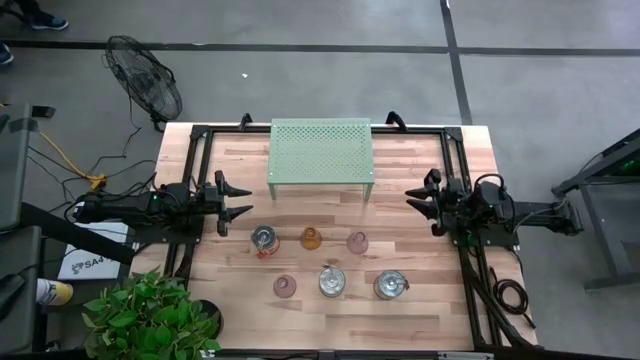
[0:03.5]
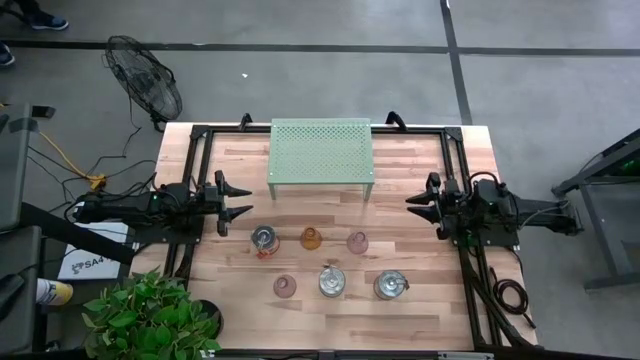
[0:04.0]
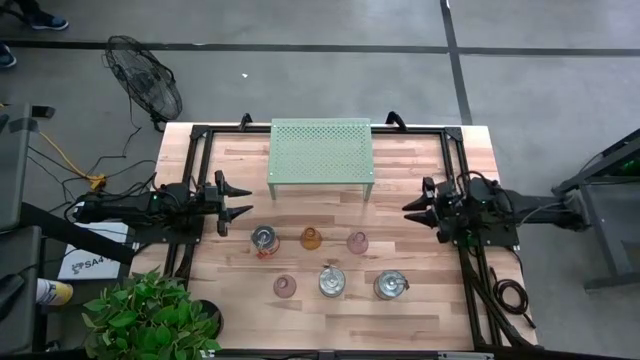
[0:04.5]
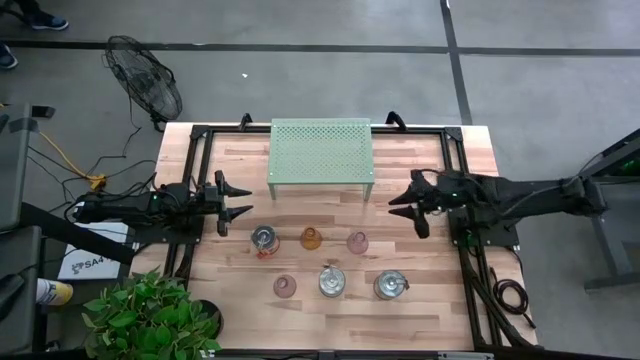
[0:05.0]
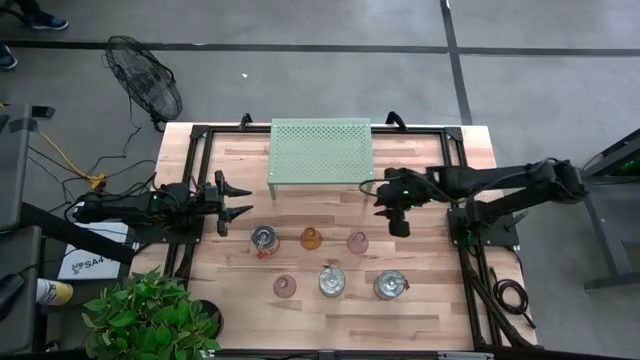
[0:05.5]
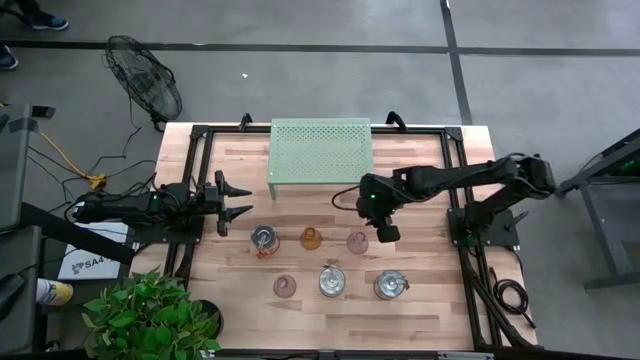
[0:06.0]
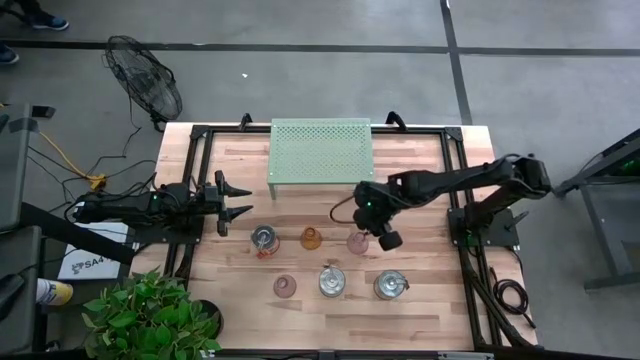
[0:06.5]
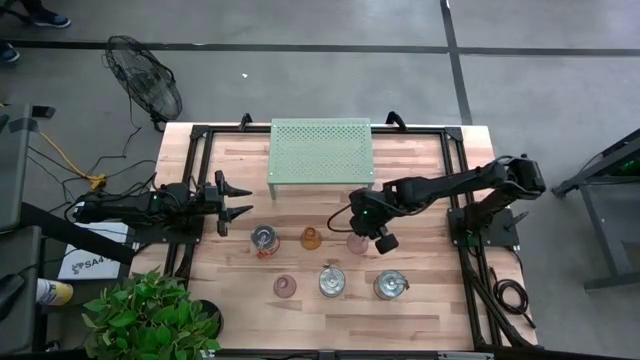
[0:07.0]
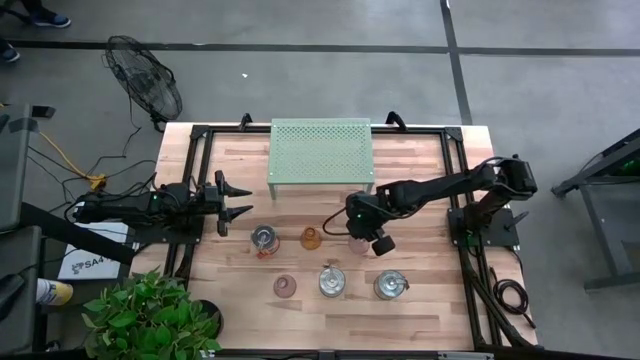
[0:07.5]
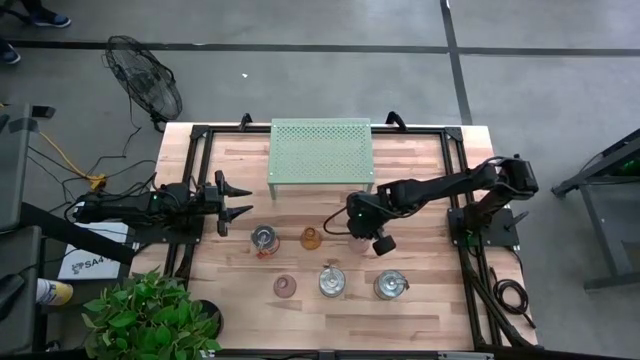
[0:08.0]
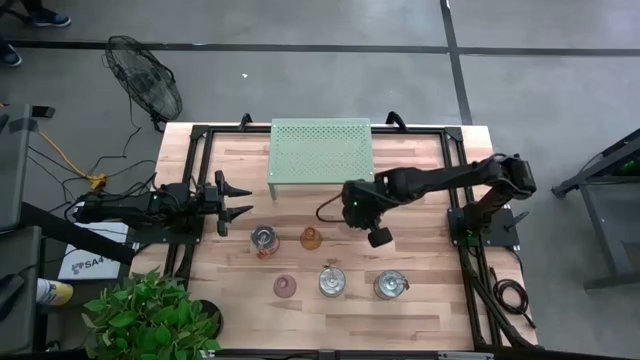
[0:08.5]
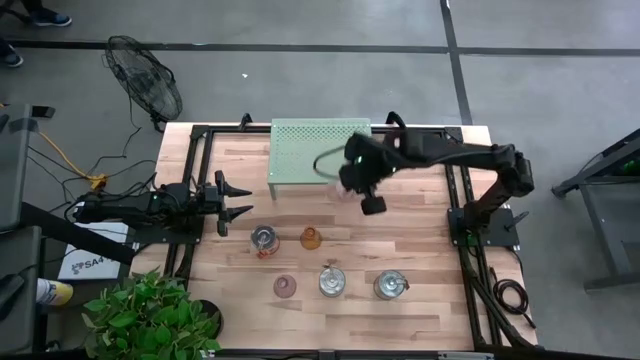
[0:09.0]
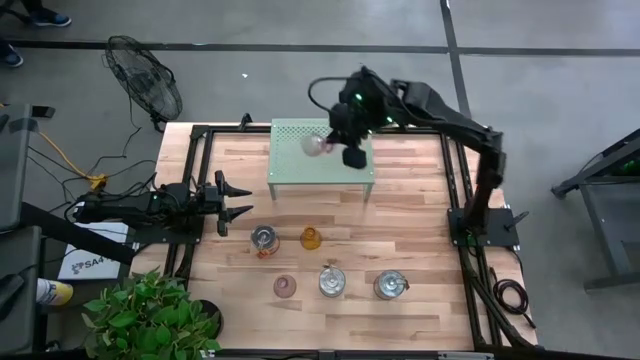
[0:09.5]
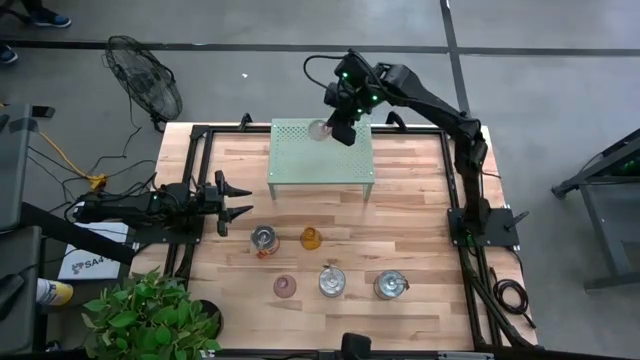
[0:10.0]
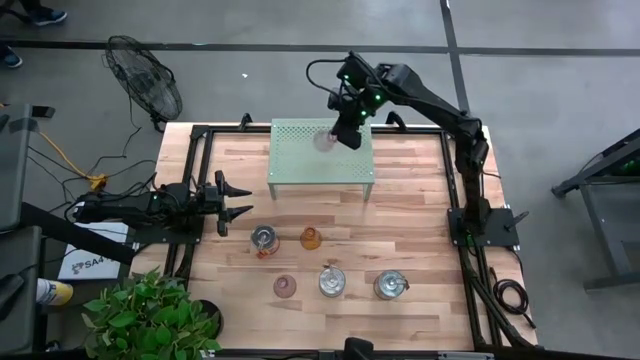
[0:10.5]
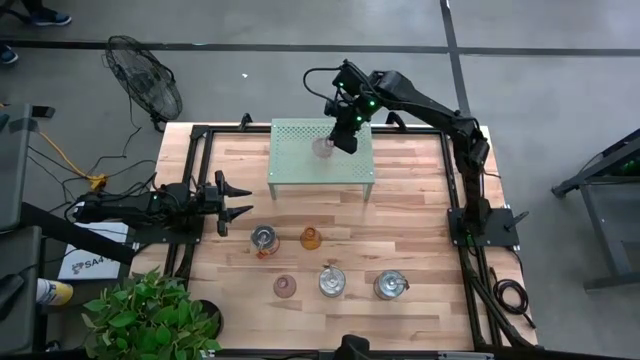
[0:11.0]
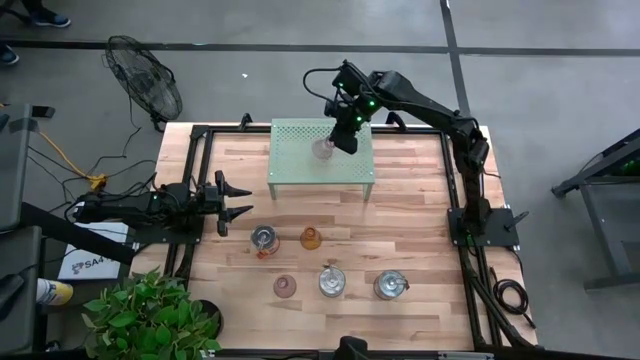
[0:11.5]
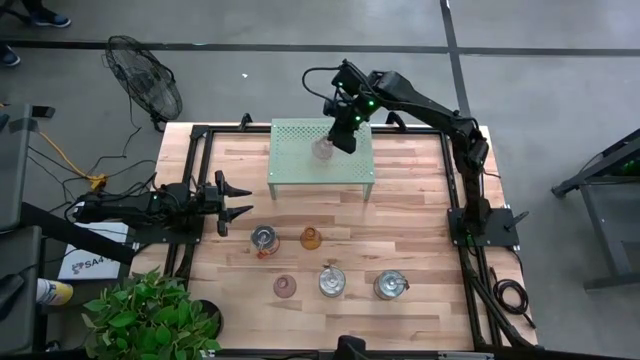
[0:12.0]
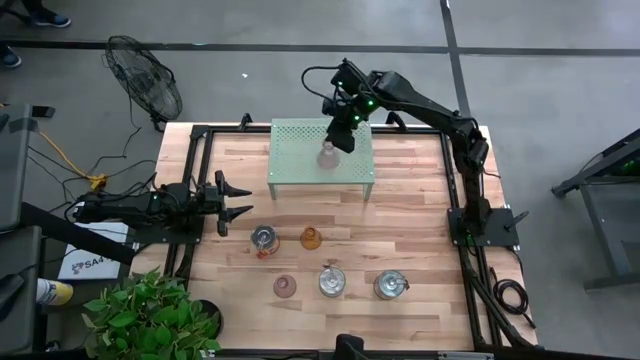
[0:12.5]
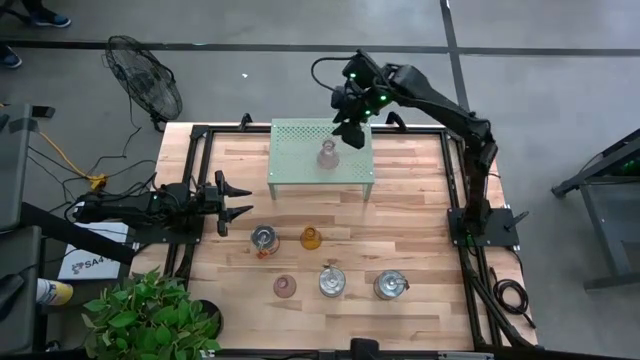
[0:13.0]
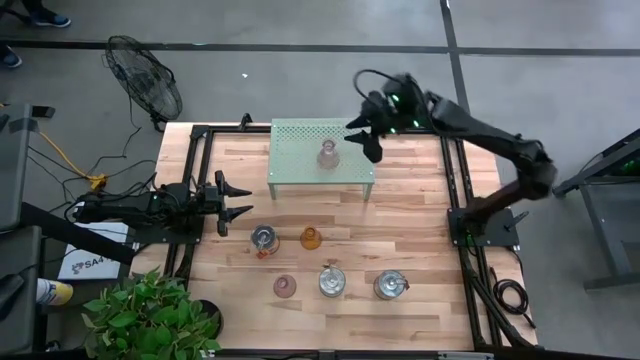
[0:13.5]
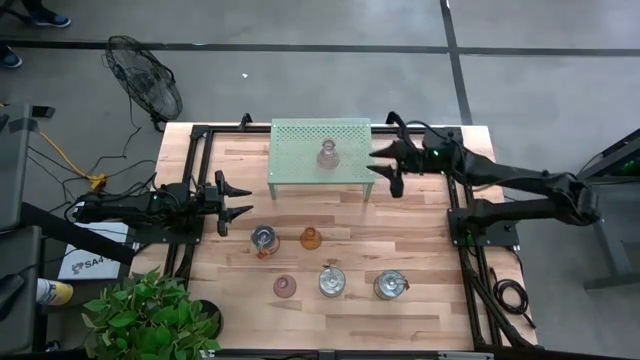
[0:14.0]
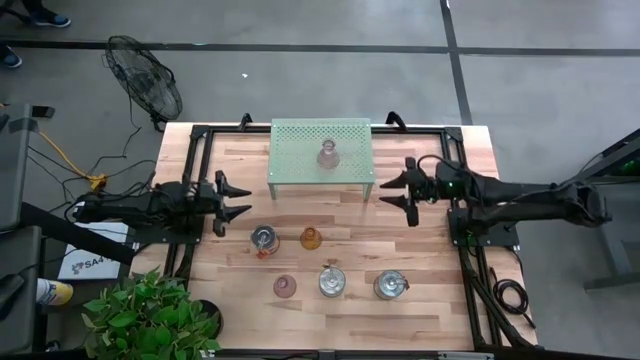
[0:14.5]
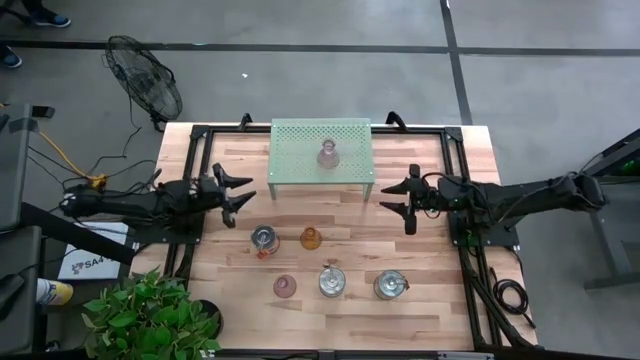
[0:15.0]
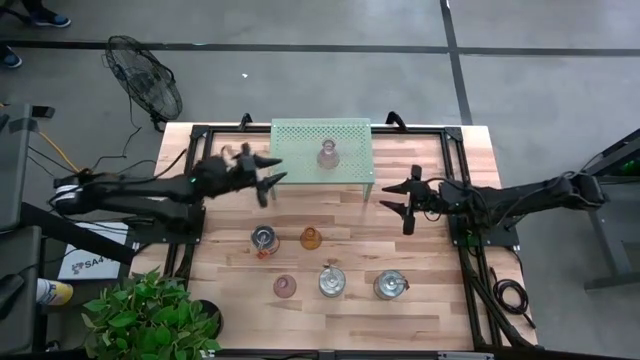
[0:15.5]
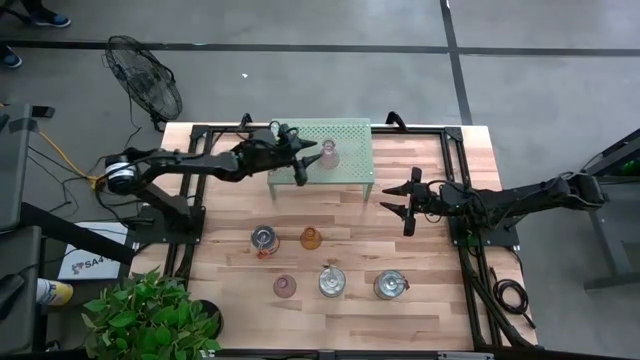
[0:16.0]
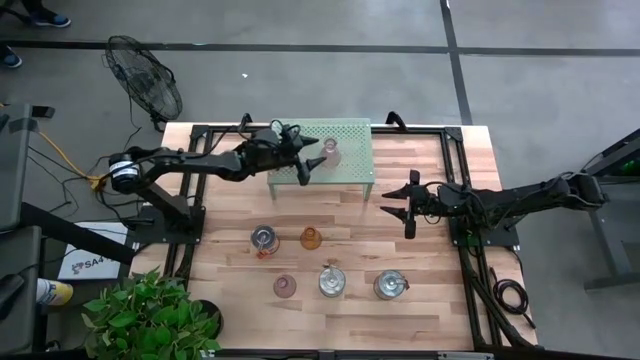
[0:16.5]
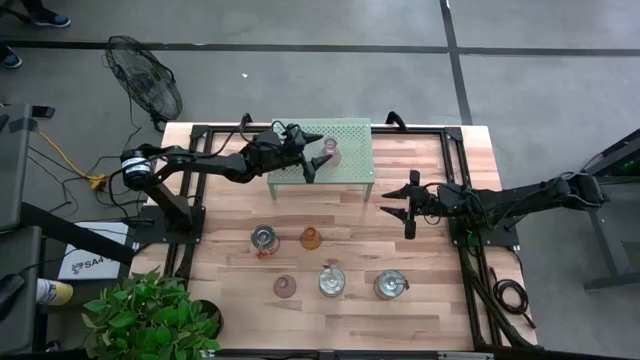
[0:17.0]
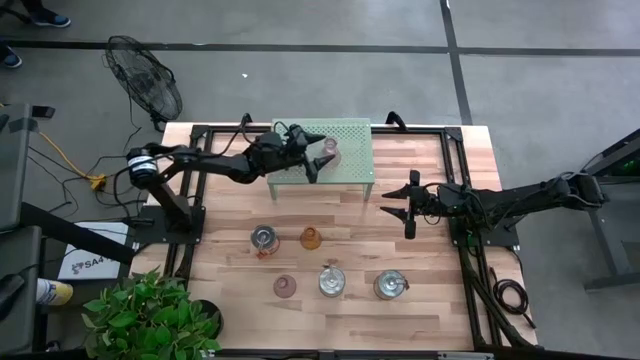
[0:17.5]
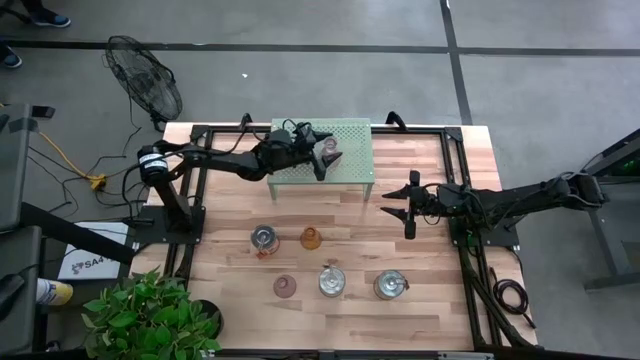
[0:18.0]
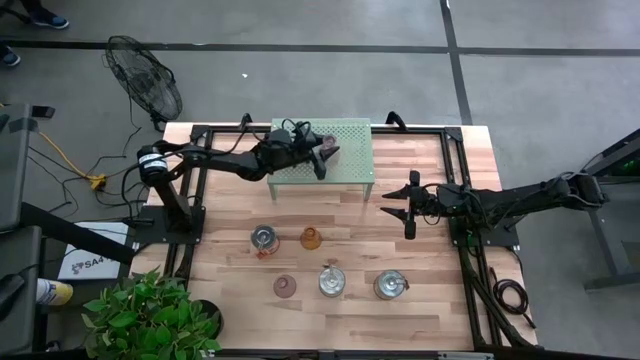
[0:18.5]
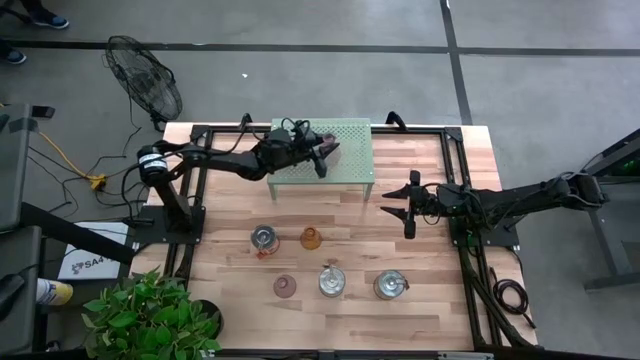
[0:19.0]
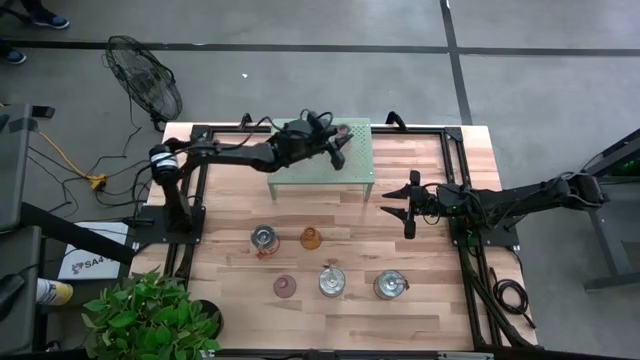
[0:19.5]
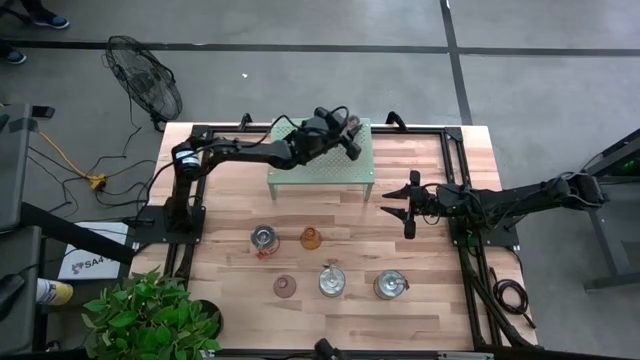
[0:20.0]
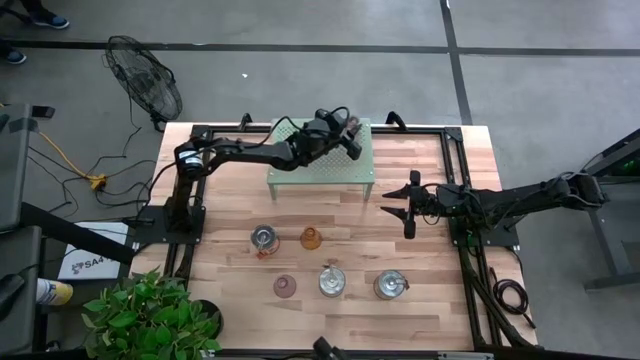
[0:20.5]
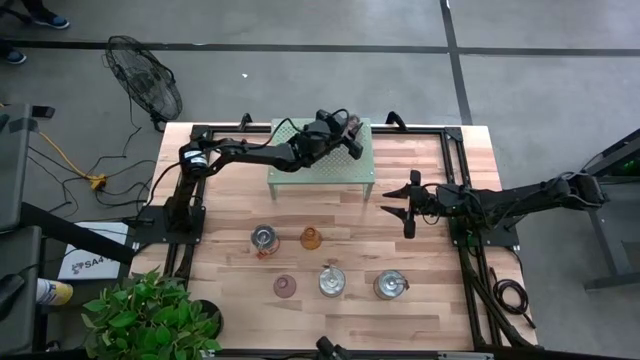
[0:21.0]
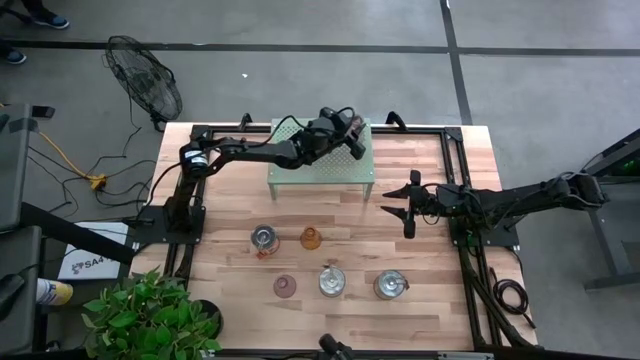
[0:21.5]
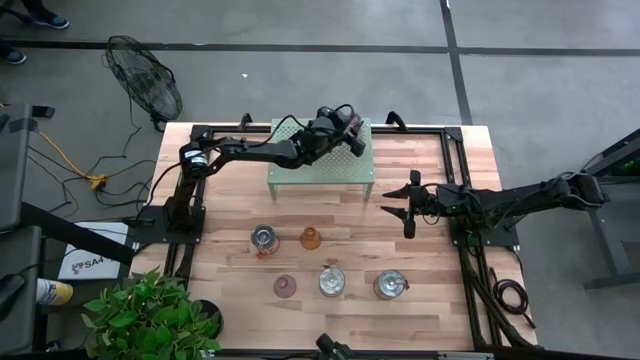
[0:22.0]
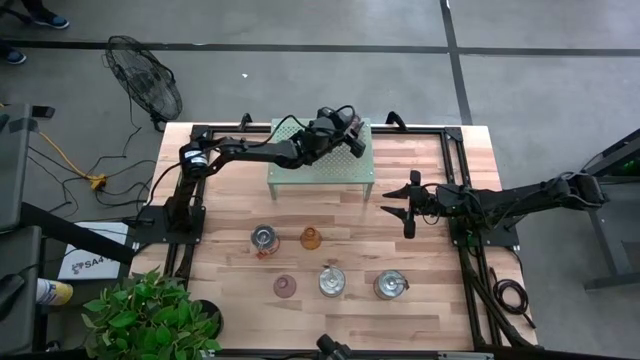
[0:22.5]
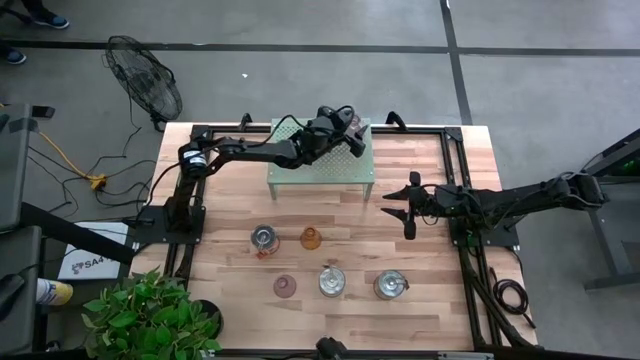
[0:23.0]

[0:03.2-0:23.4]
Task: Pick & Place candle stick holders
Put the top pink glass candle holder on the shelf

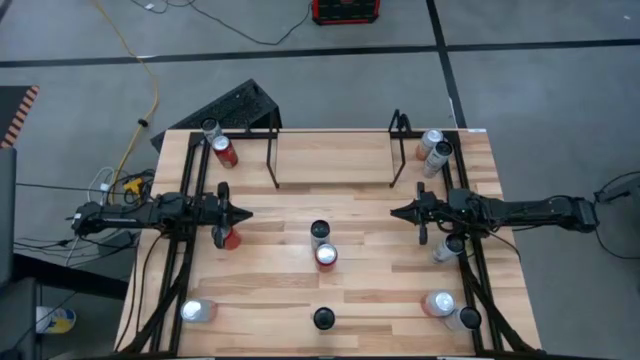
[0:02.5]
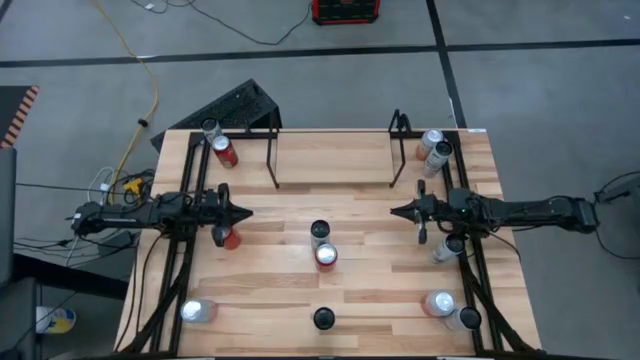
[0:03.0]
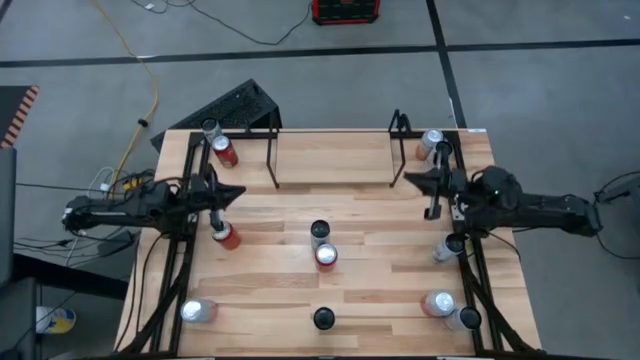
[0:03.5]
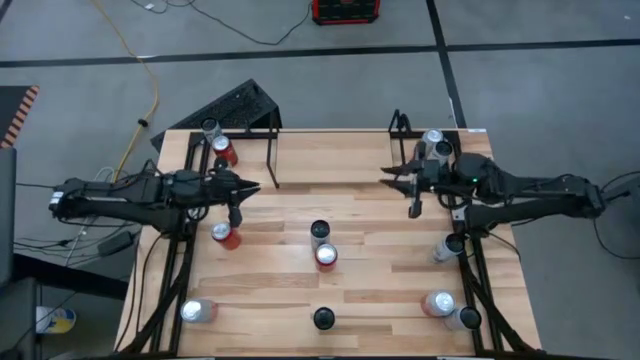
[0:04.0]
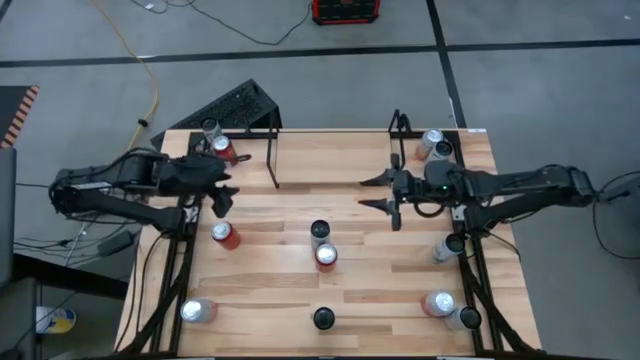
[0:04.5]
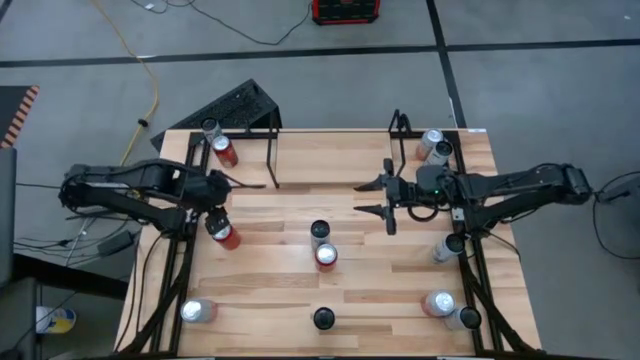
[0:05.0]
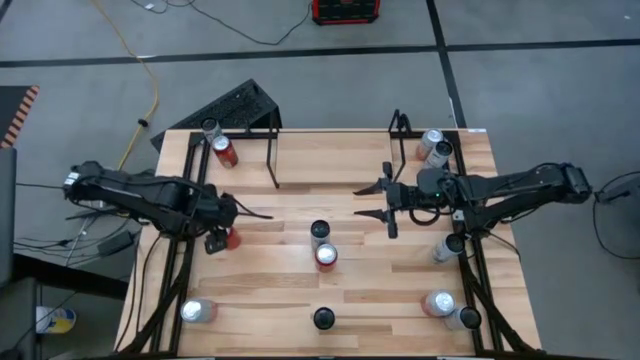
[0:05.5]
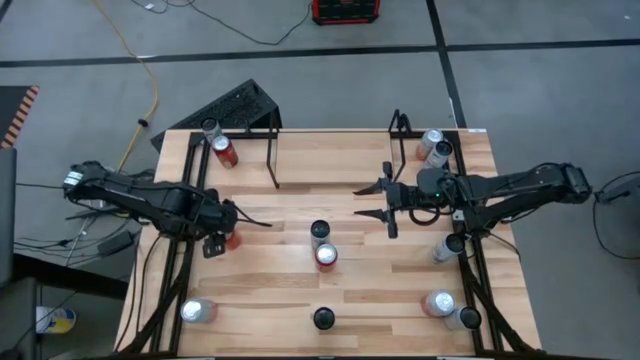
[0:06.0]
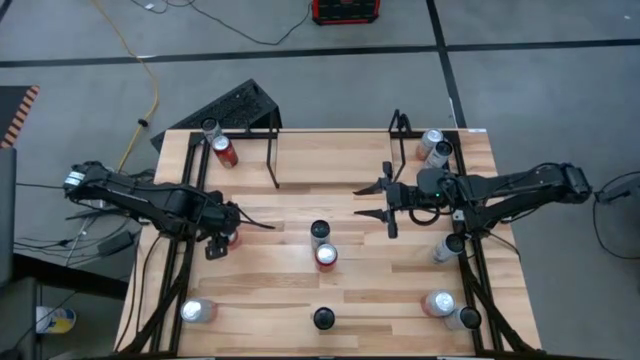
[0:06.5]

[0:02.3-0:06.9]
Task: Place canned beverage on shelf
Put the bottom left red black soda can on the shelf
